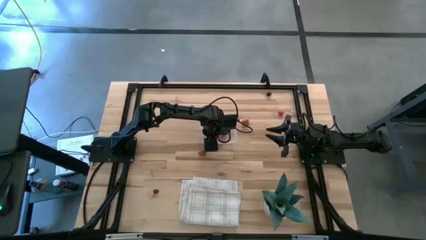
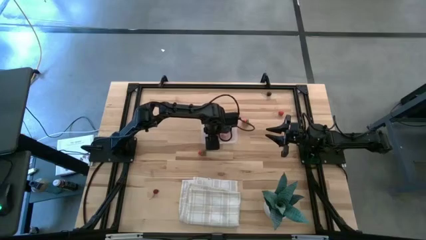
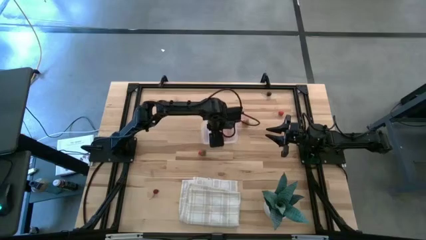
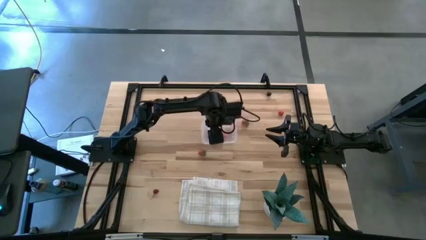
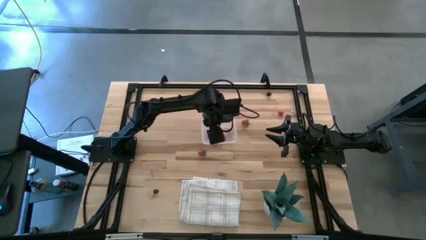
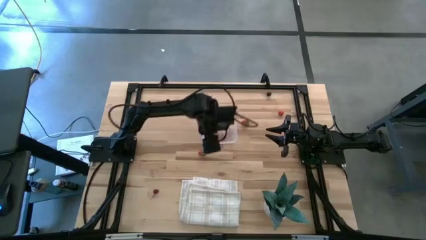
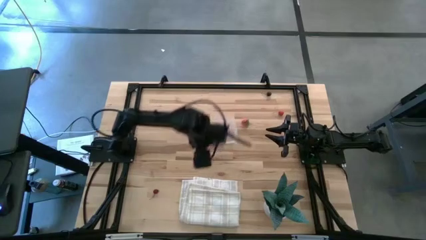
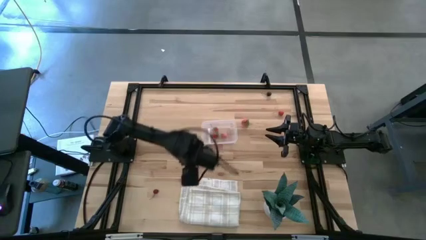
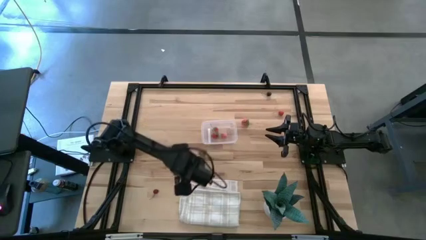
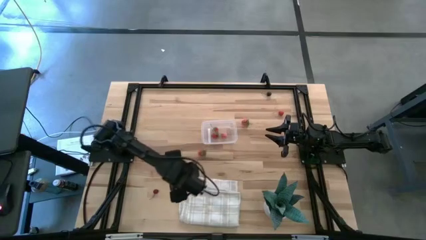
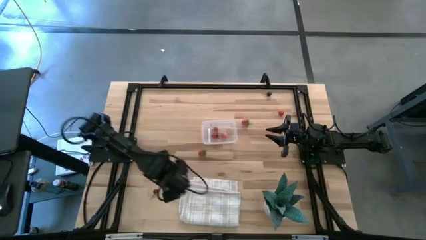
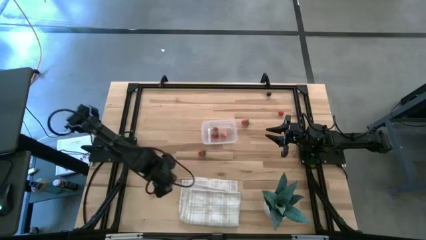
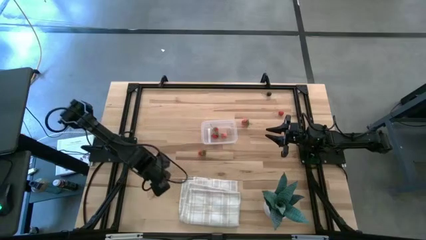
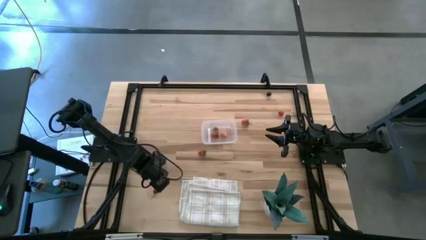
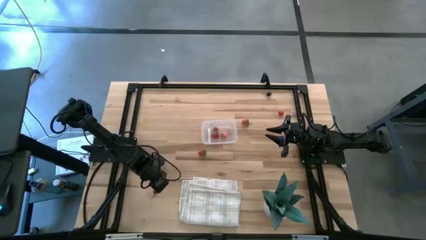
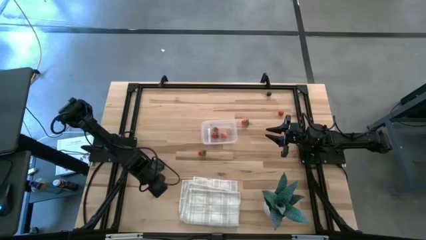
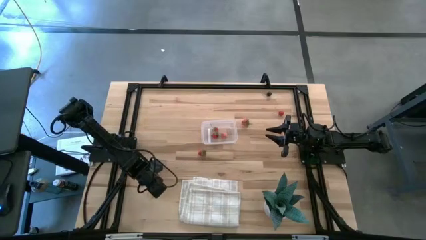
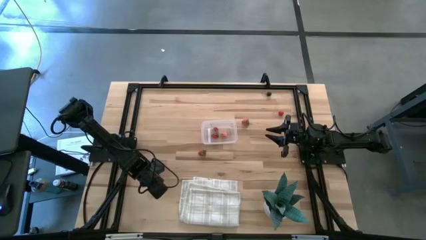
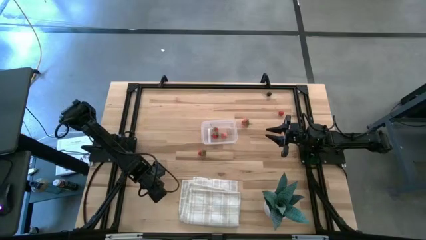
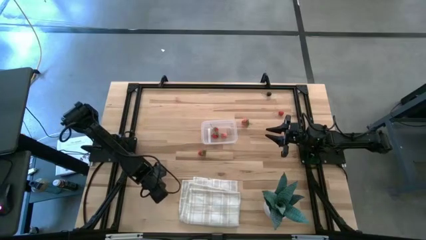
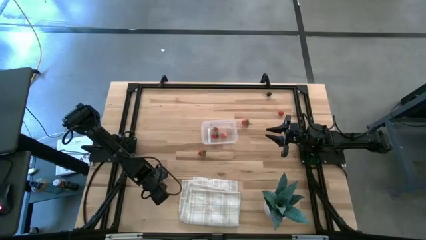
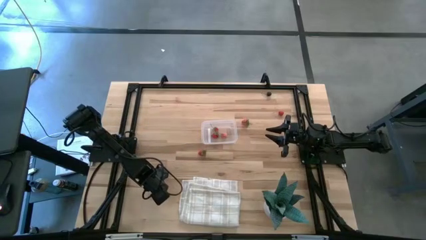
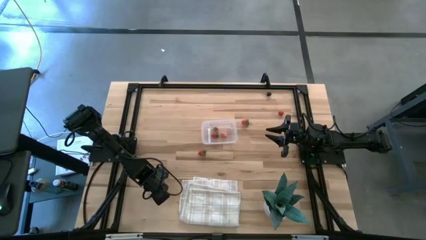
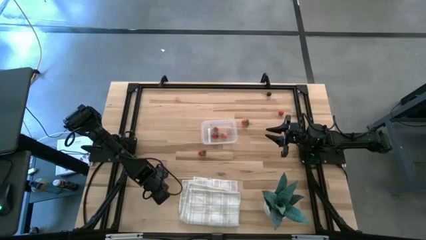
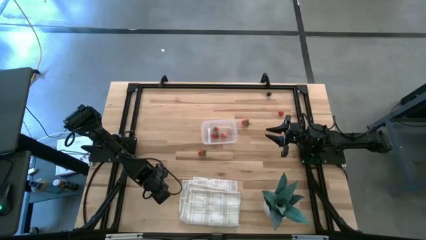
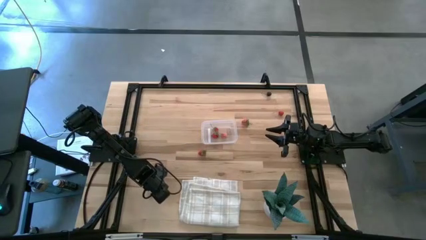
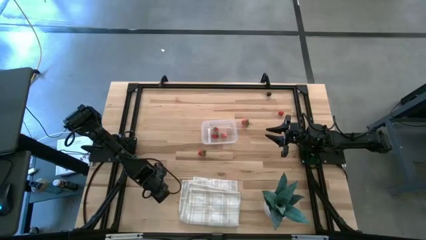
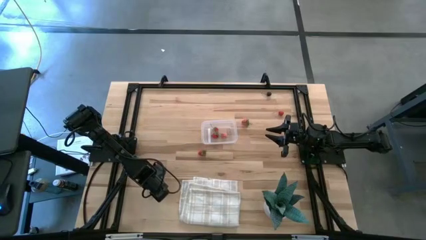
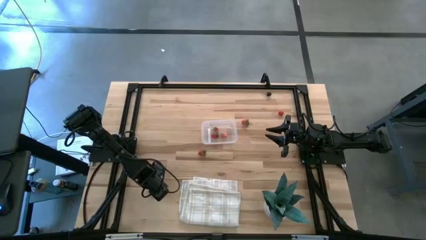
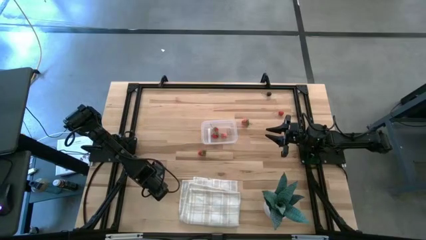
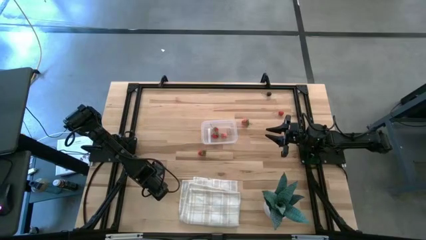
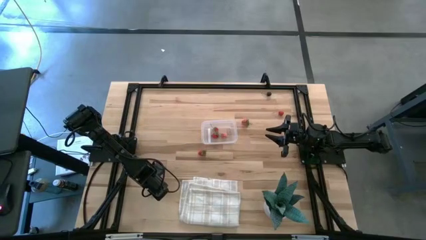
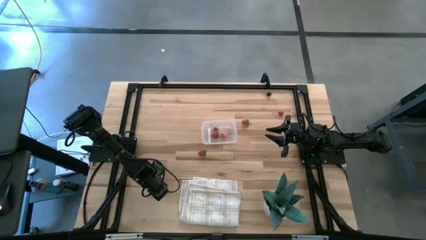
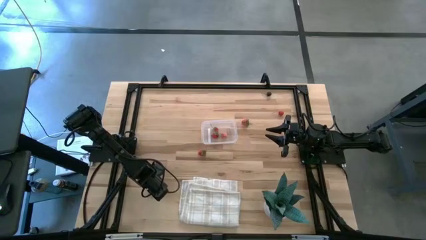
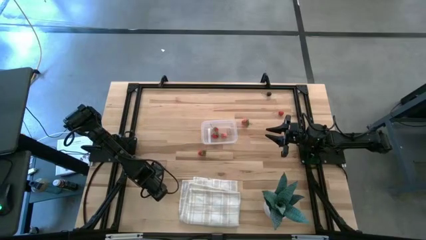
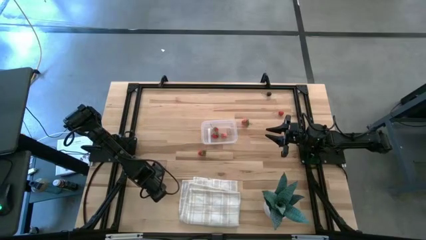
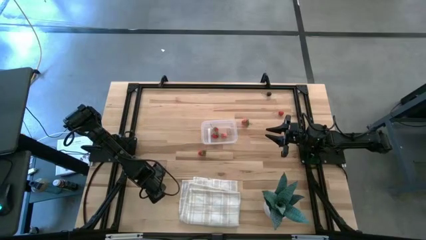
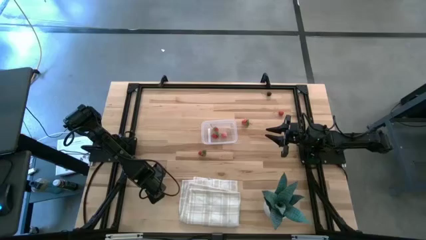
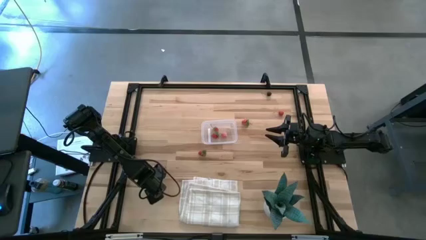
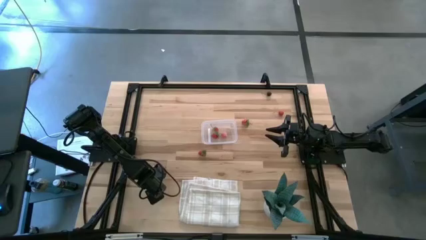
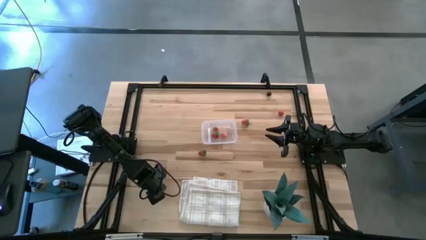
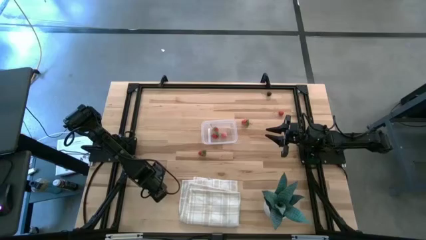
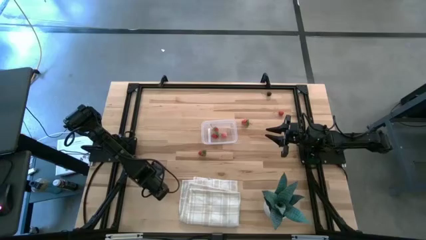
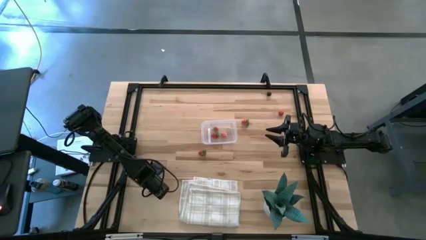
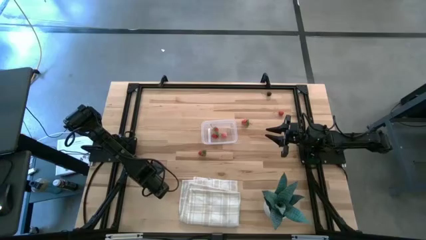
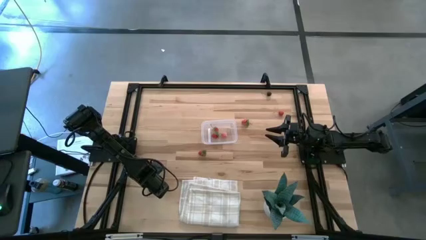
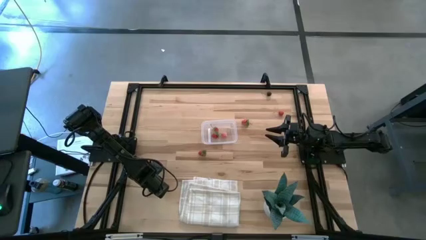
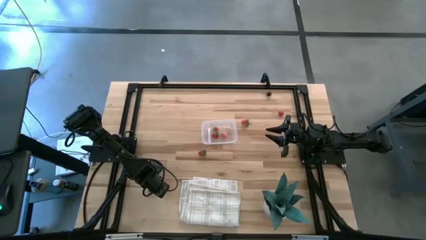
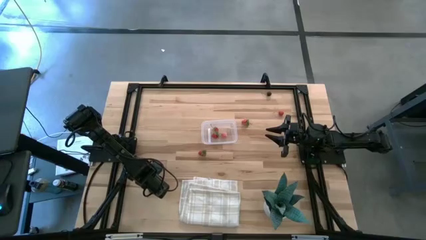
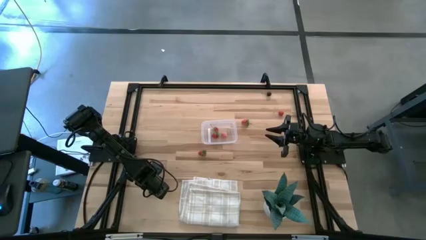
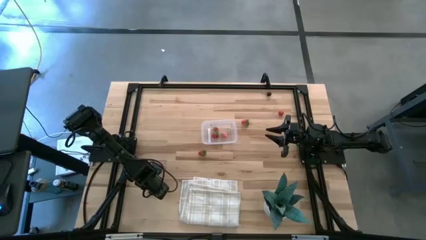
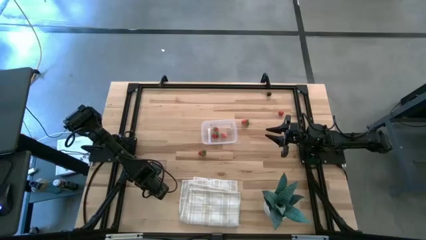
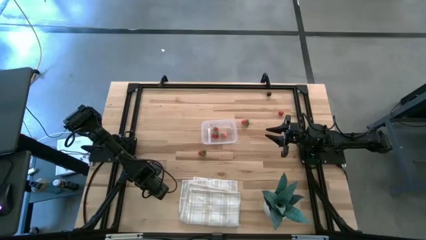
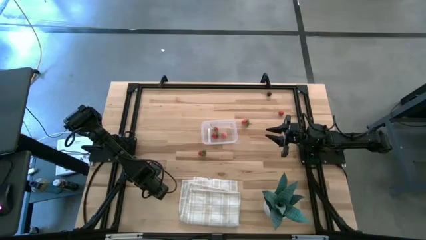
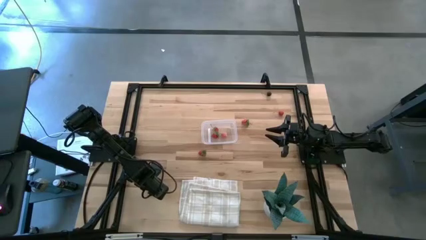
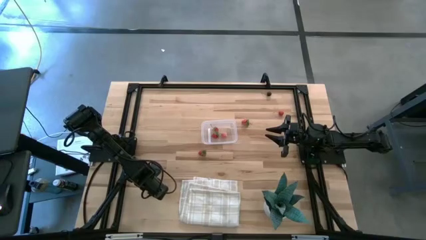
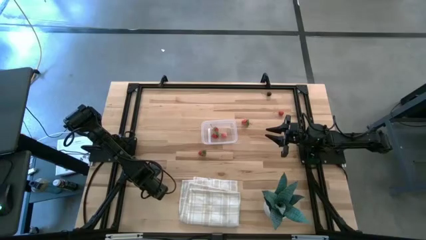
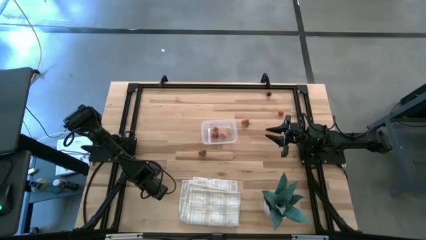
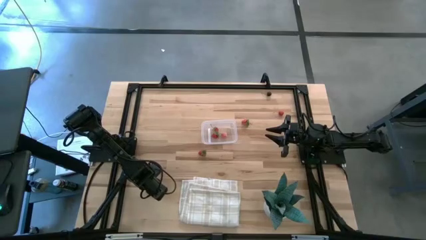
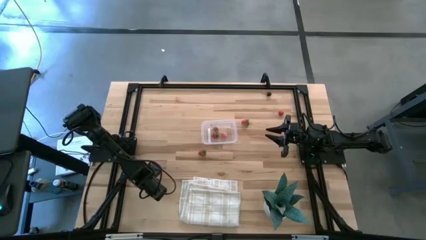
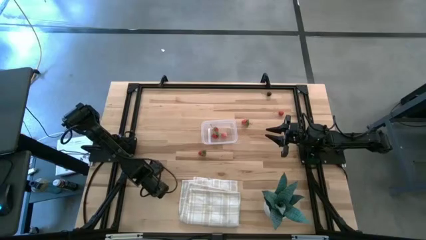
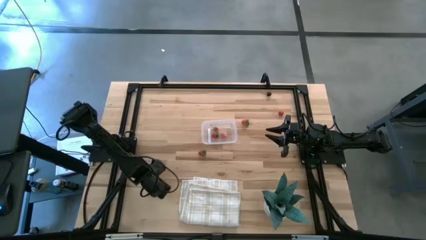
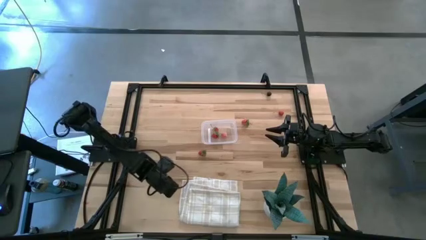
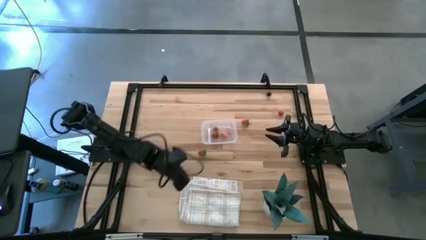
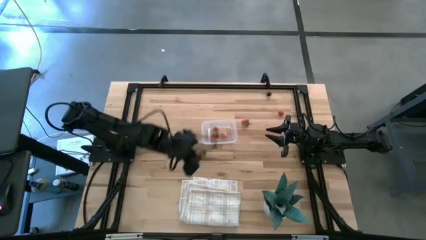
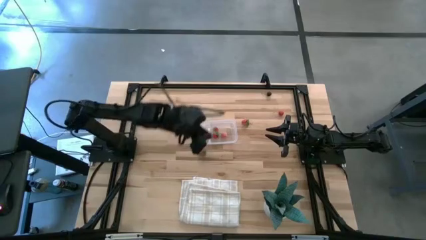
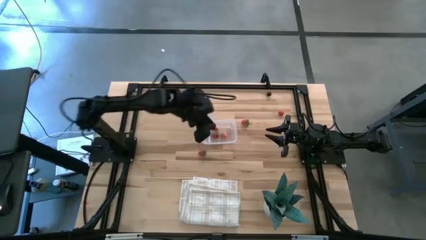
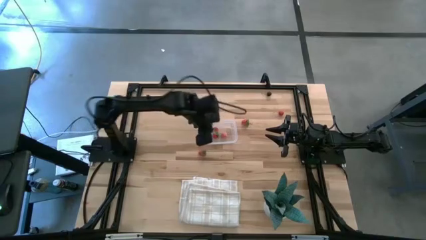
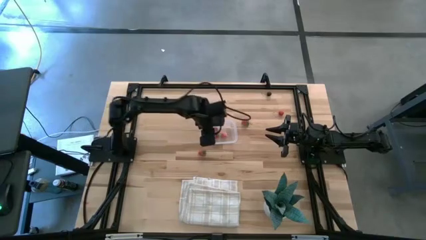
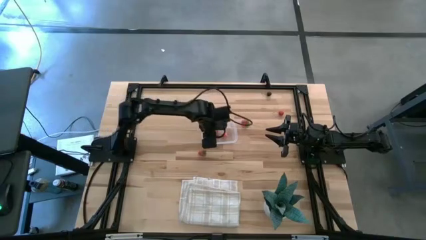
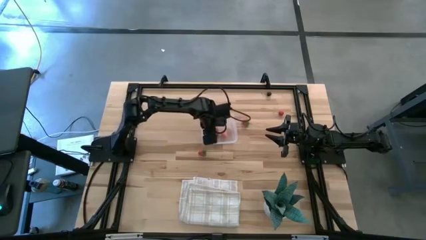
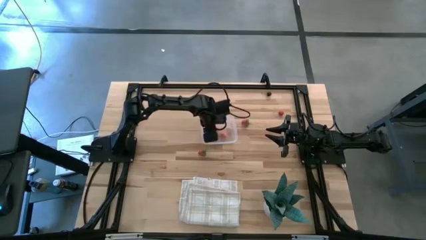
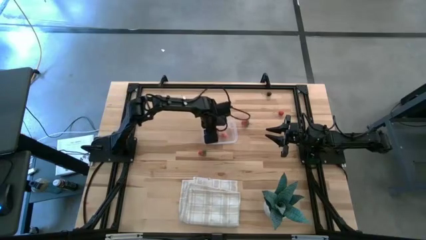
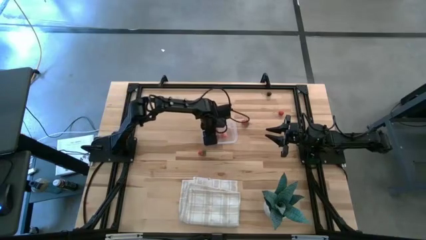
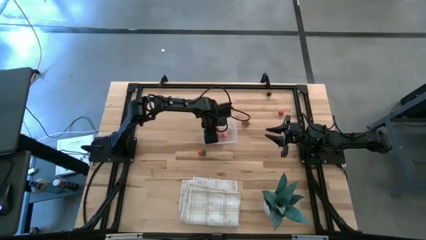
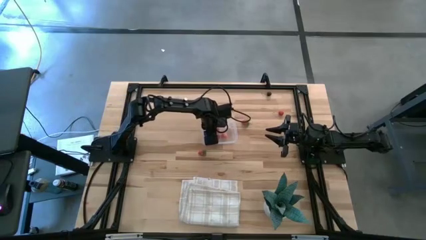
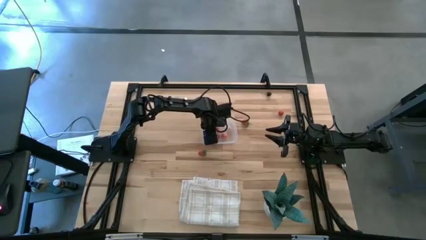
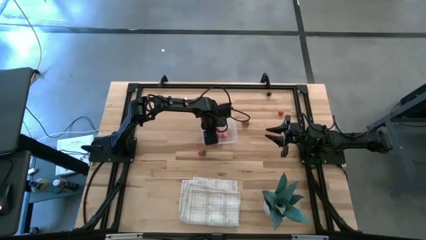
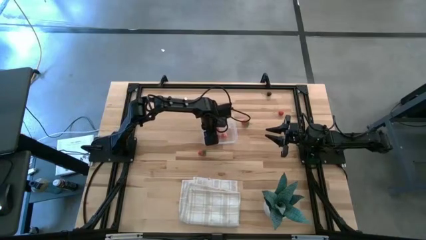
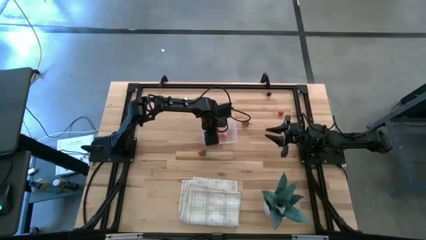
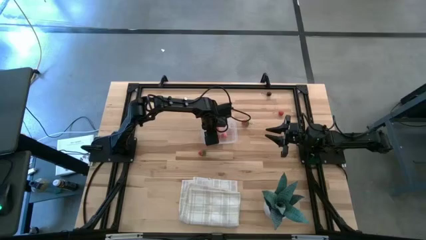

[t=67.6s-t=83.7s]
Task: Pick and placing Produce into tupperware
Put the red cherry into the transparent bin
